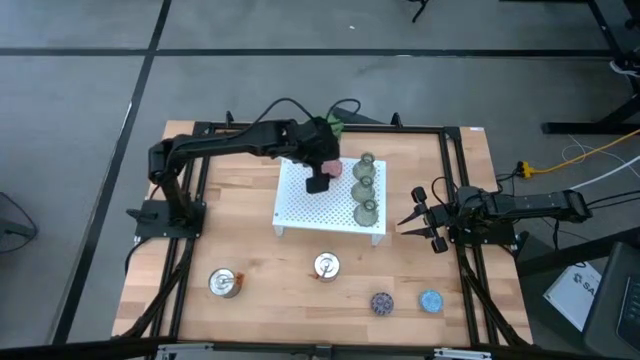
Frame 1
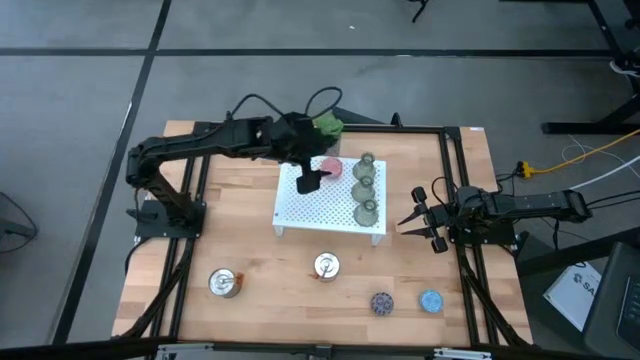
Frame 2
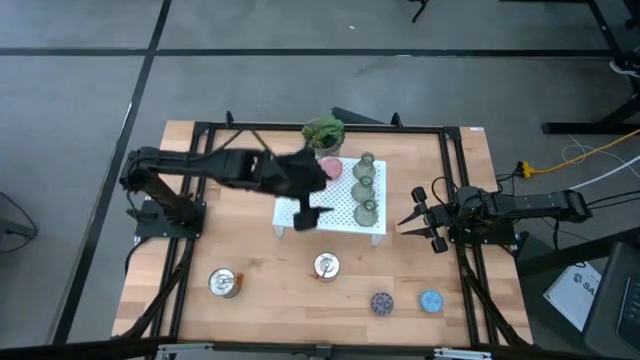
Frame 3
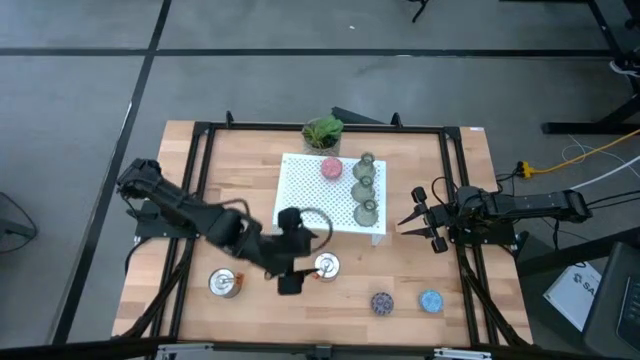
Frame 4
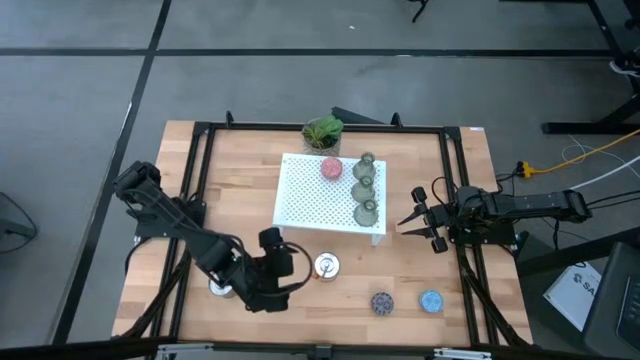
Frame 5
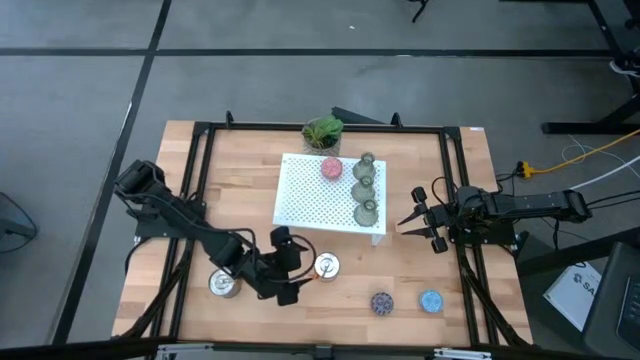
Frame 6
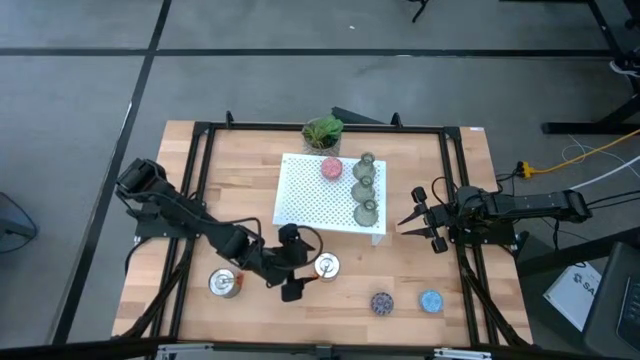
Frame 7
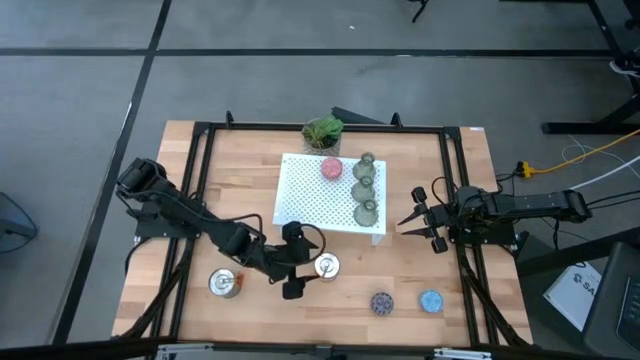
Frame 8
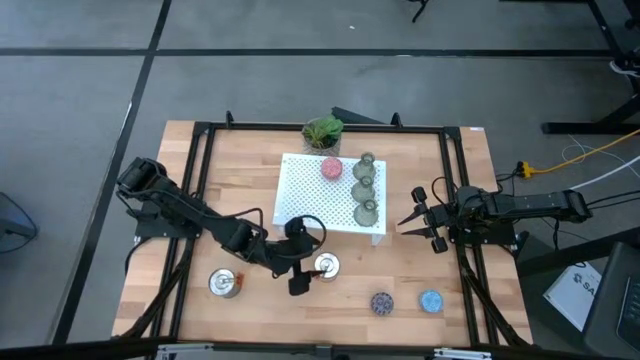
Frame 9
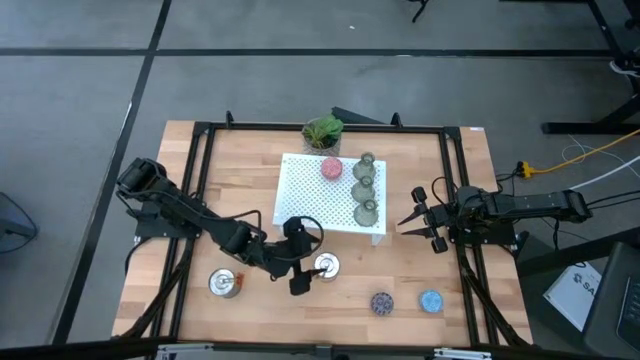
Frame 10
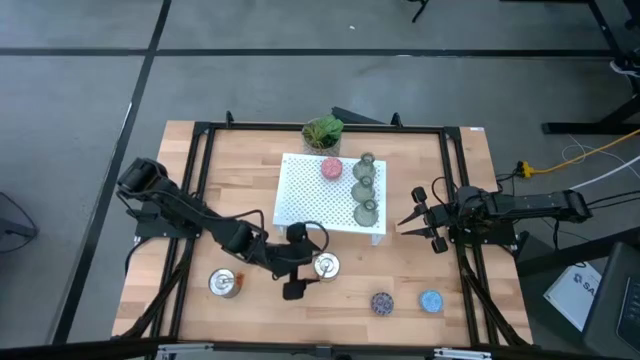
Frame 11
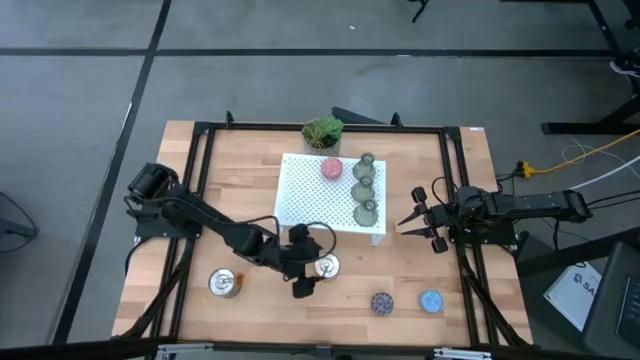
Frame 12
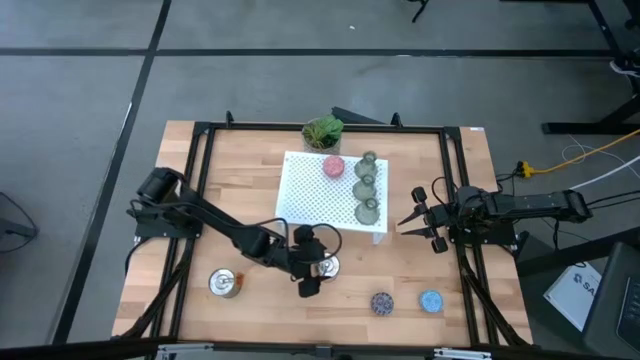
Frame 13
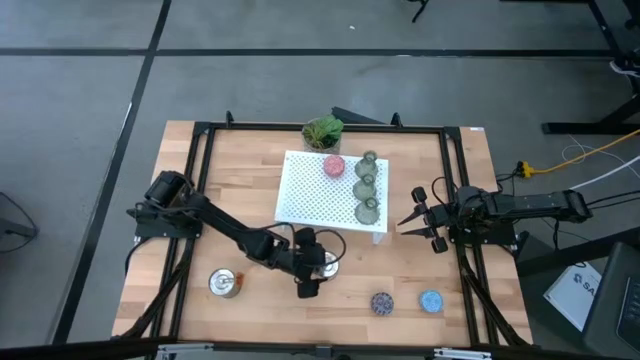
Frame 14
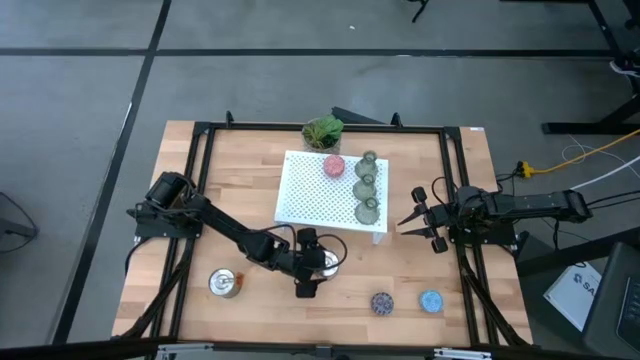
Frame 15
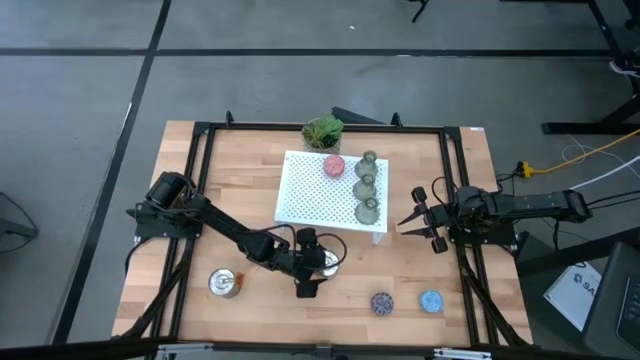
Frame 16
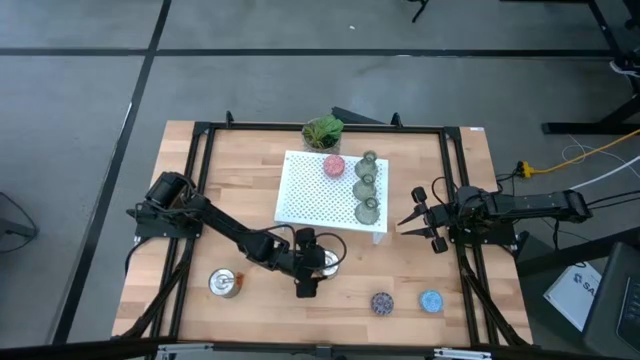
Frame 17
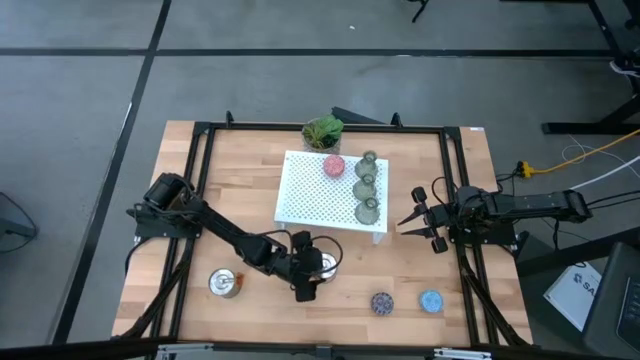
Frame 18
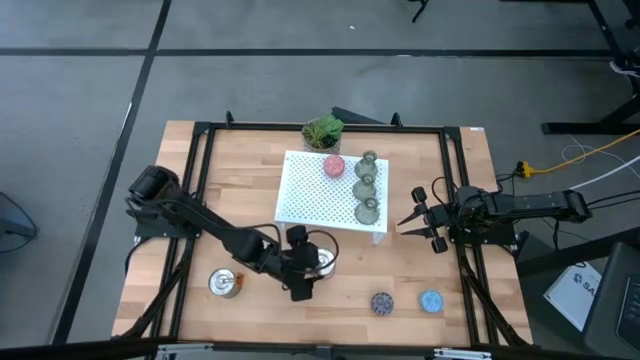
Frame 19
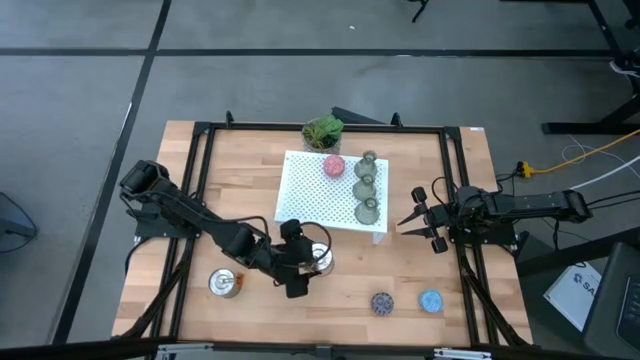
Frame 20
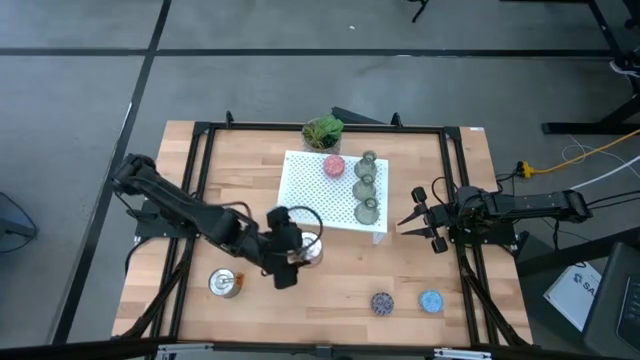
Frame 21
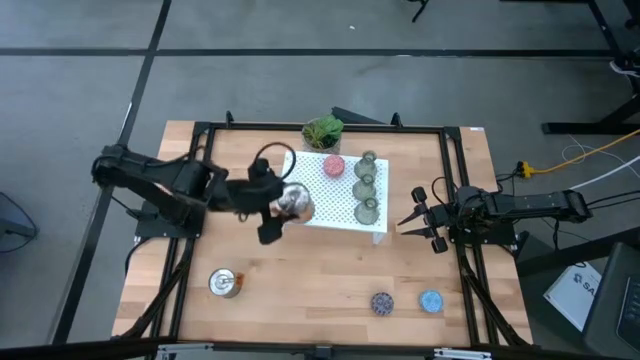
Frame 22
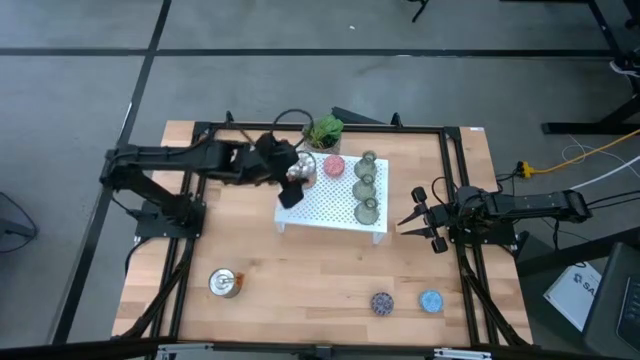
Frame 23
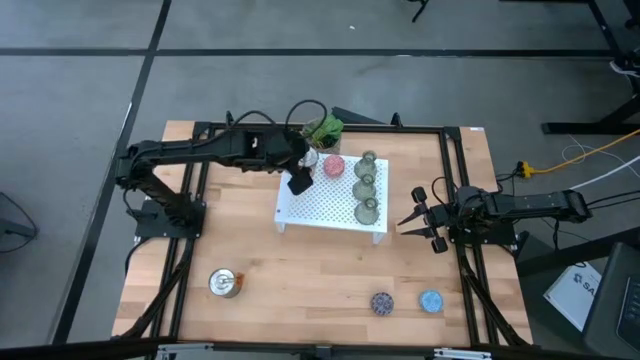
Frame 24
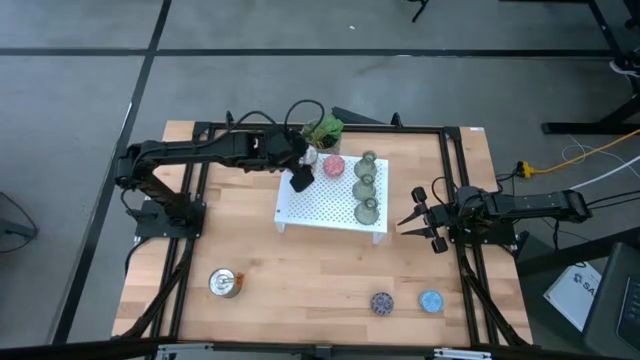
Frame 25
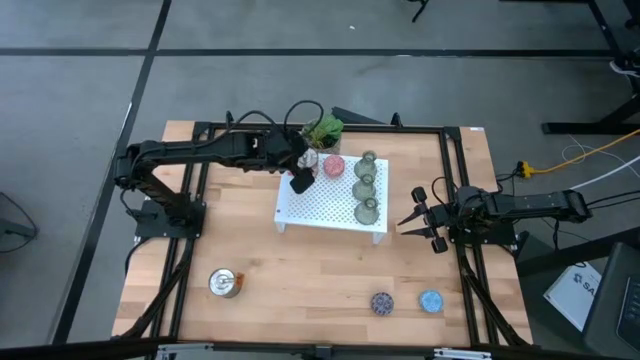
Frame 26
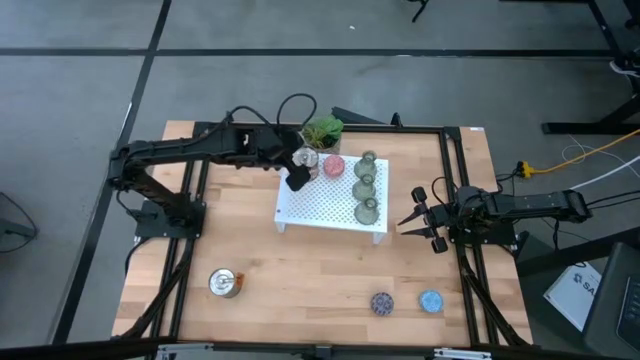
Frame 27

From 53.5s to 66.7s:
Task: Stock candles and vases on shelf
Put the top scented candle on the shelf

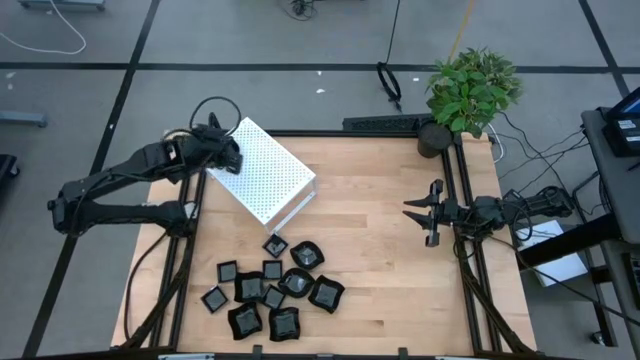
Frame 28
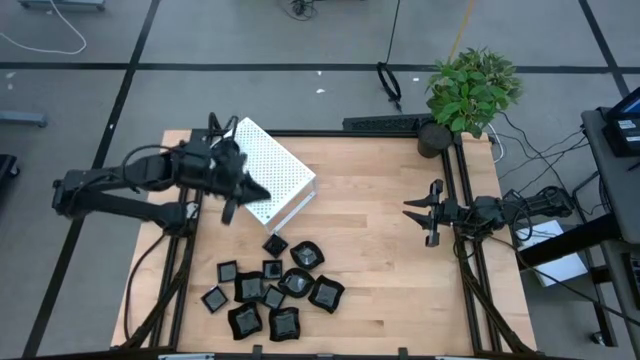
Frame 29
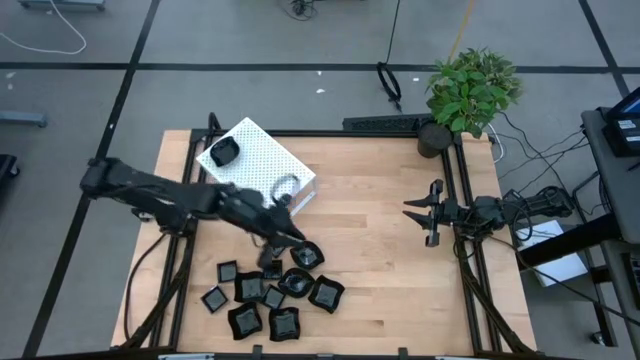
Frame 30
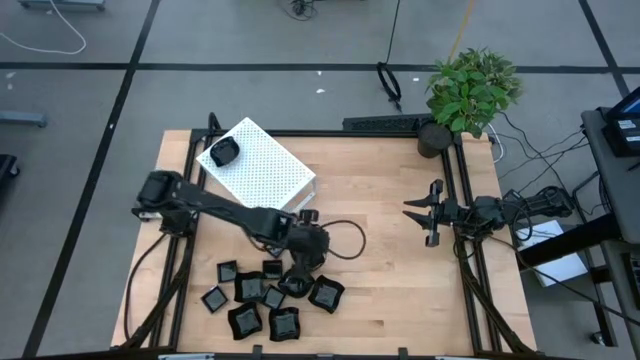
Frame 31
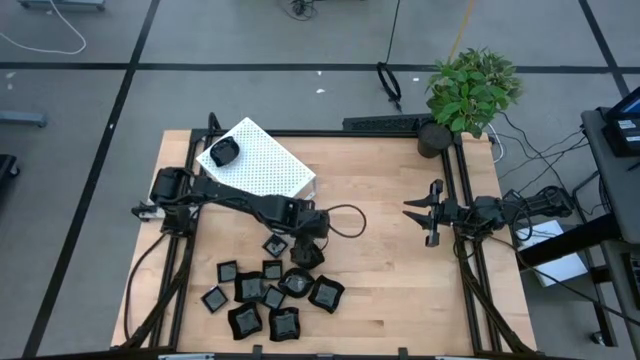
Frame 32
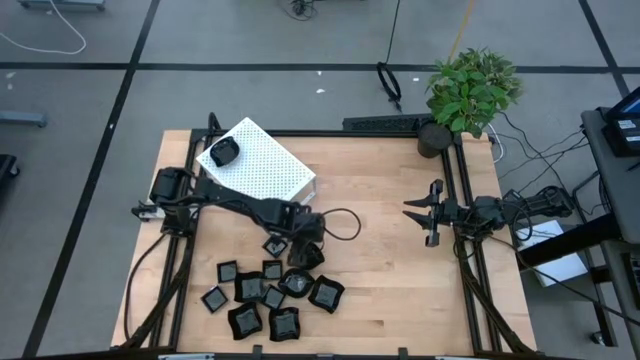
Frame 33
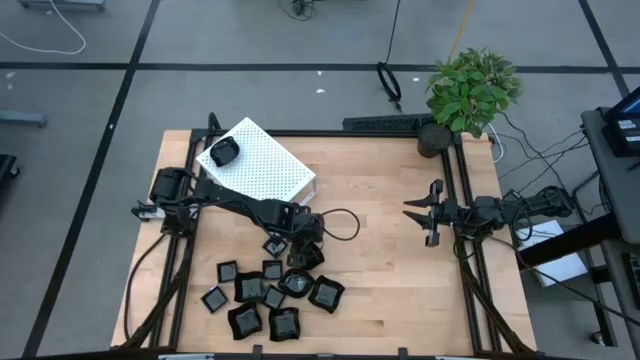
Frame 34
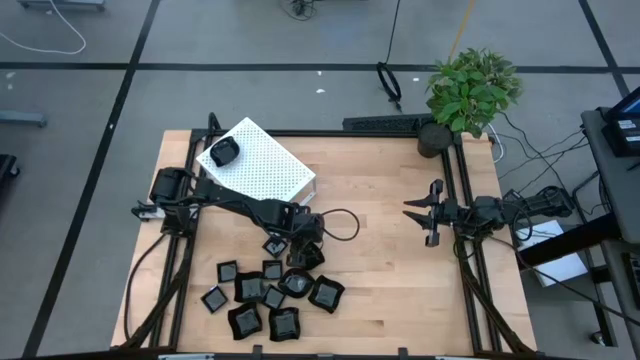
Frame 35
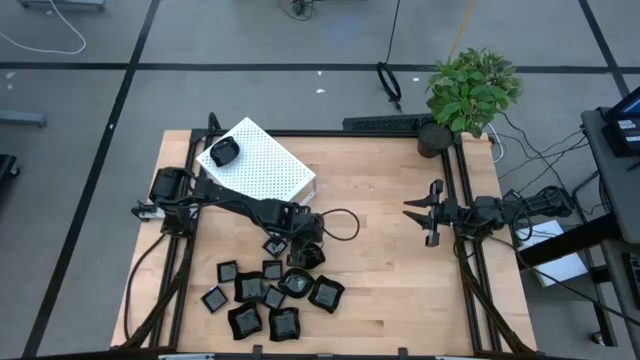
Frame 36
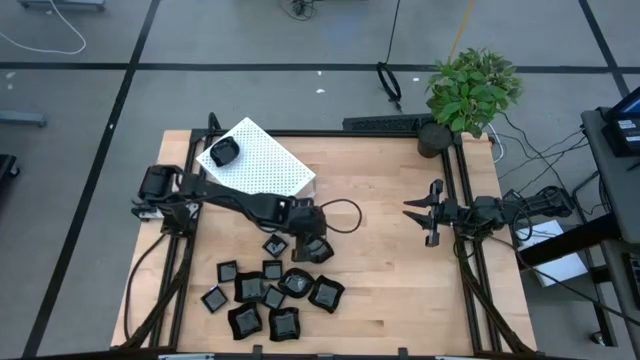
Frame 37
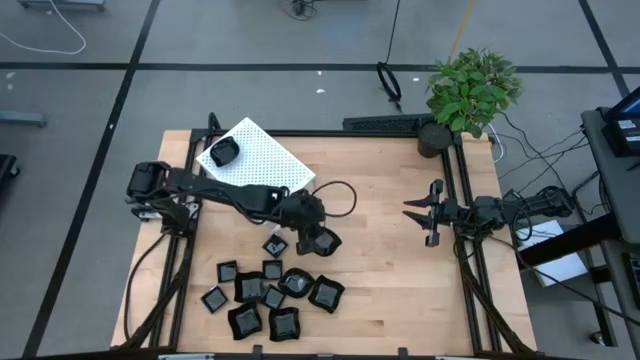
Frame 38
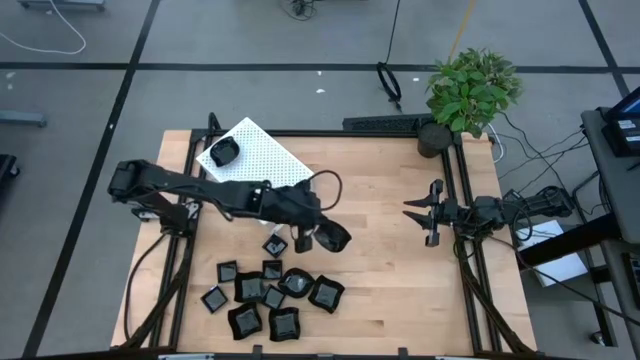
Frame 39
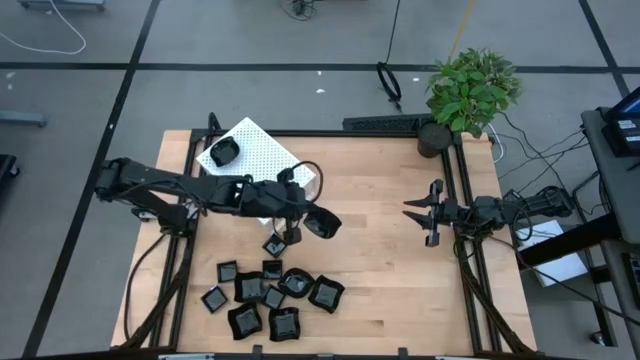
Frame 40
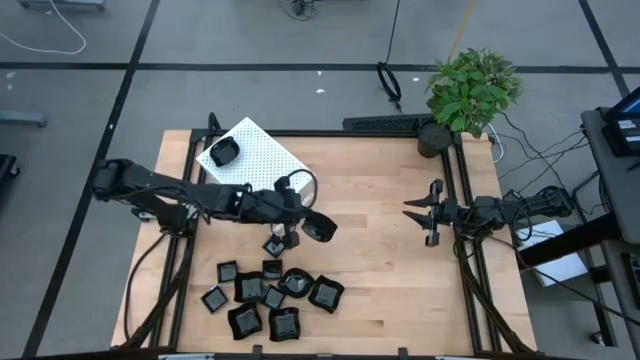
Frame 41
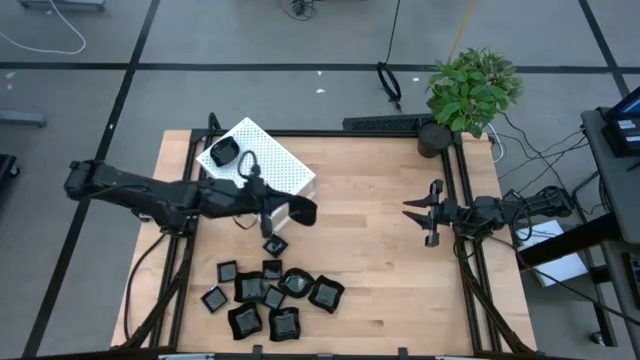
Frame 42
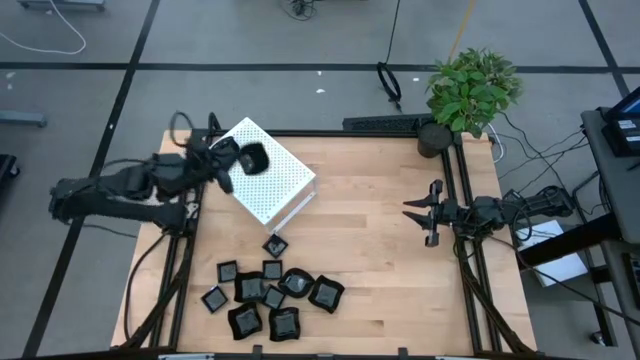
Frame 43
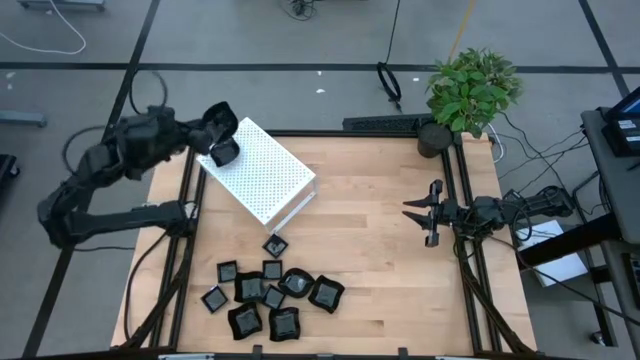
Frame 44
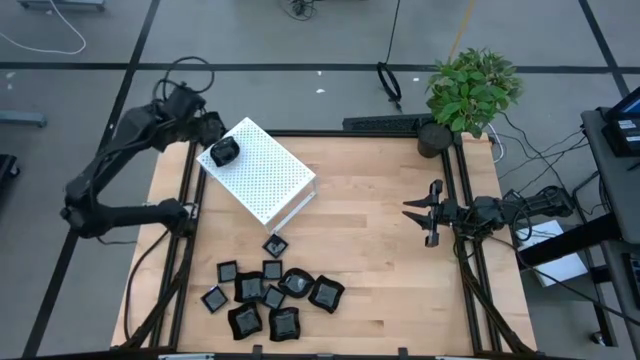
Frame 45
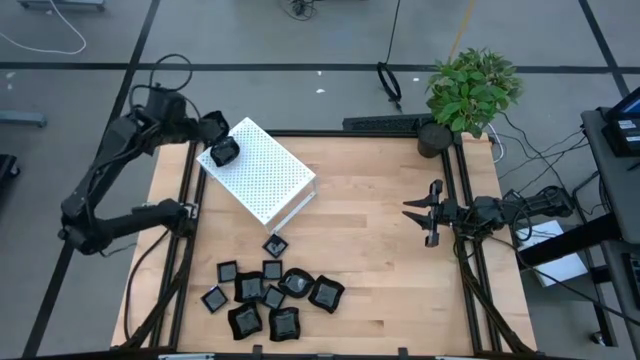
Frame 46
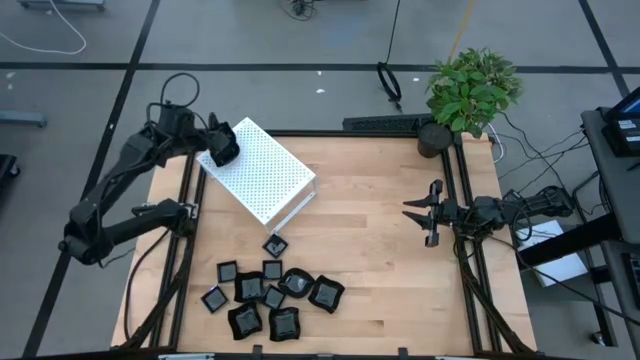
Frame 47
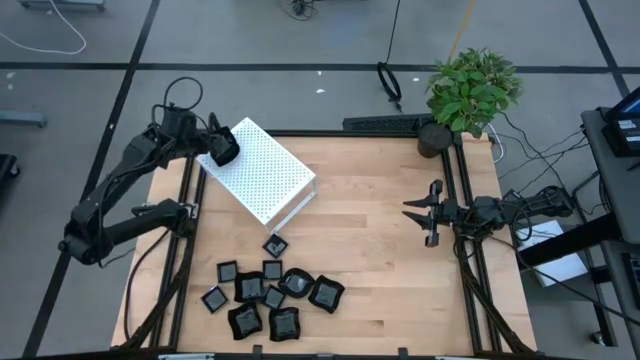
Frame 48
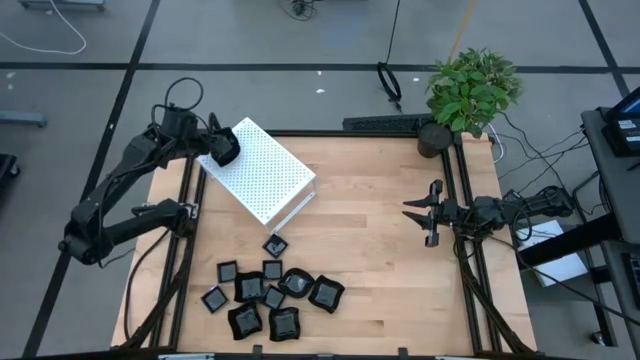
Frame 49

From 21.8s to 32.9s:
Task: Pick & Place Mini shaped plates
Stack the black leaf-shaped plate on top of the black leaf-shaped plate on the shelf
